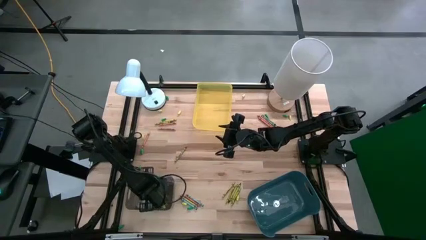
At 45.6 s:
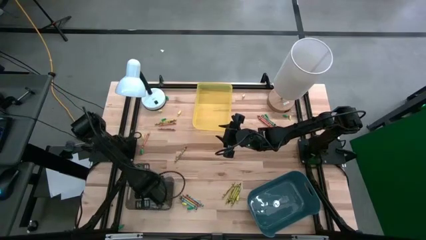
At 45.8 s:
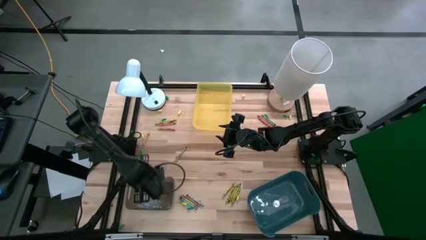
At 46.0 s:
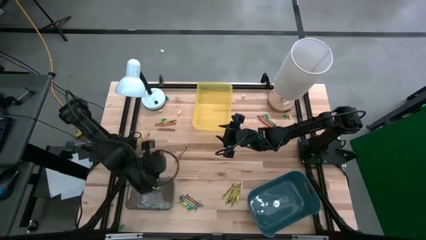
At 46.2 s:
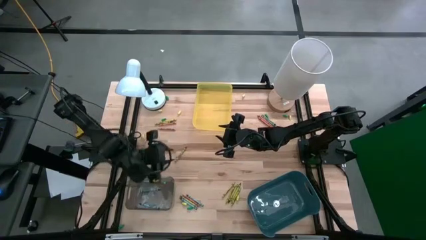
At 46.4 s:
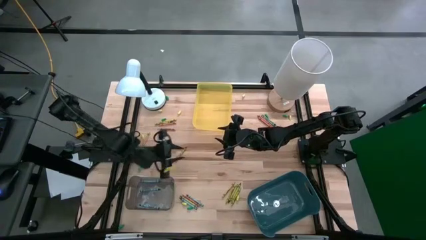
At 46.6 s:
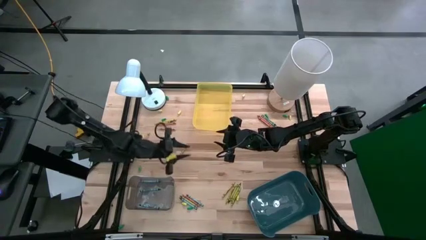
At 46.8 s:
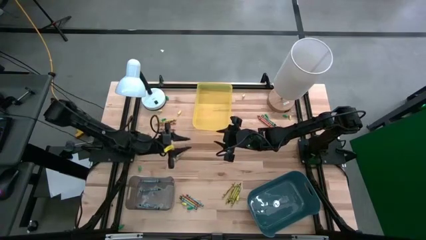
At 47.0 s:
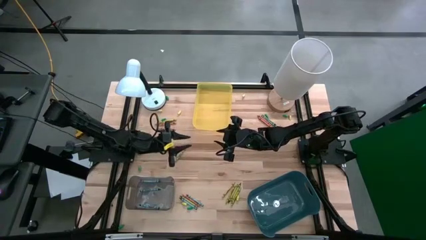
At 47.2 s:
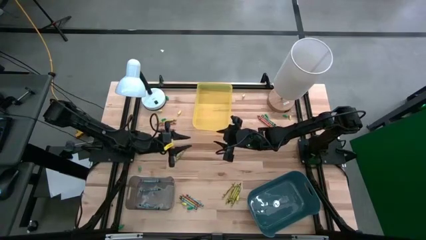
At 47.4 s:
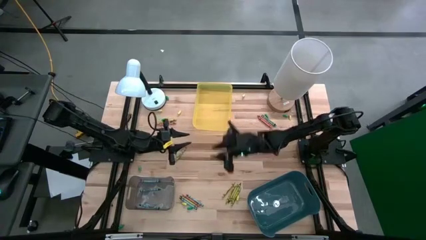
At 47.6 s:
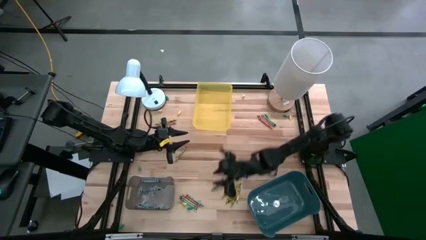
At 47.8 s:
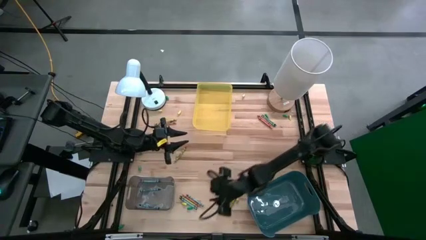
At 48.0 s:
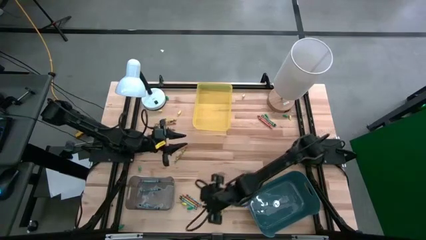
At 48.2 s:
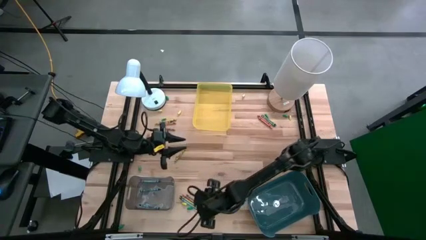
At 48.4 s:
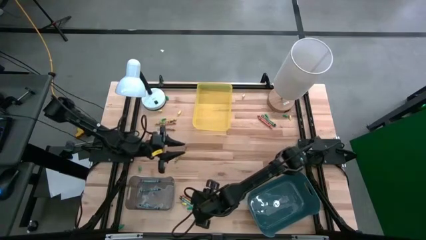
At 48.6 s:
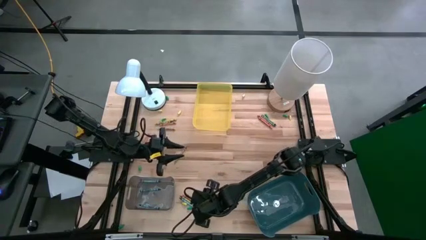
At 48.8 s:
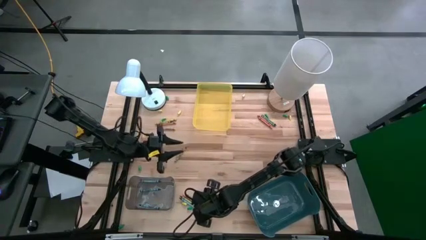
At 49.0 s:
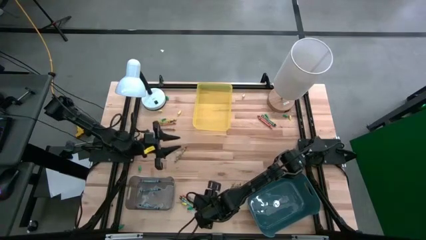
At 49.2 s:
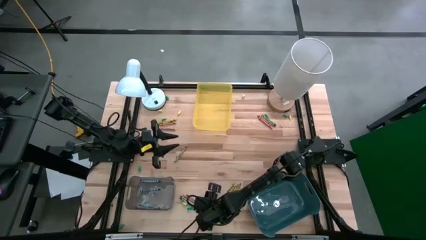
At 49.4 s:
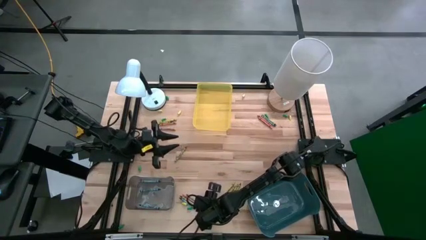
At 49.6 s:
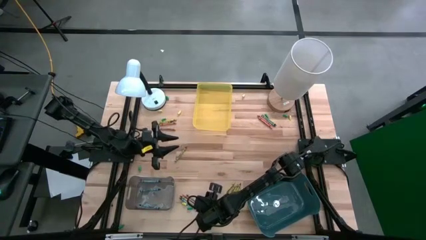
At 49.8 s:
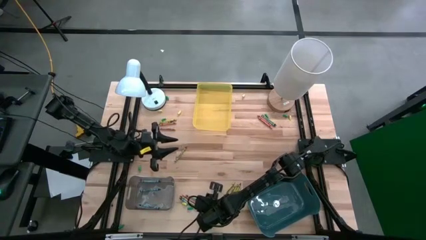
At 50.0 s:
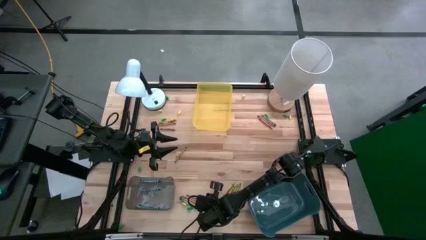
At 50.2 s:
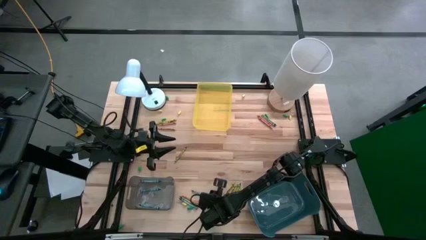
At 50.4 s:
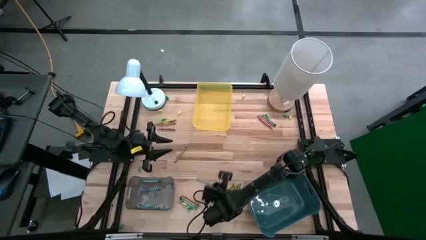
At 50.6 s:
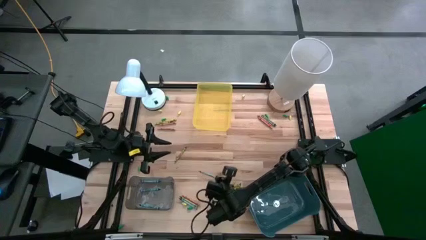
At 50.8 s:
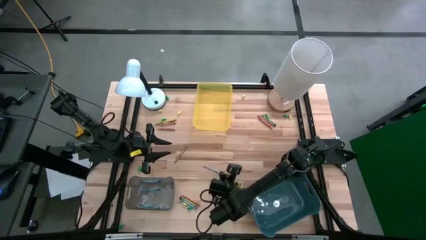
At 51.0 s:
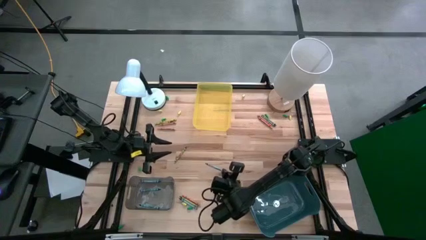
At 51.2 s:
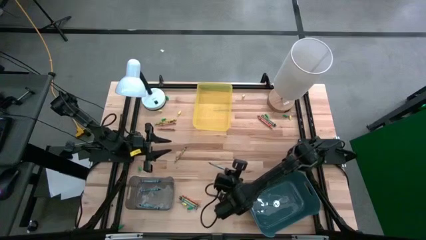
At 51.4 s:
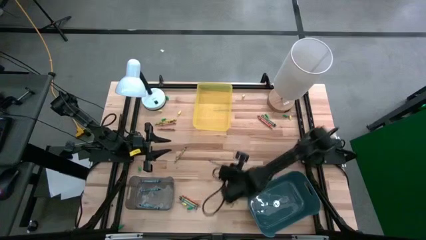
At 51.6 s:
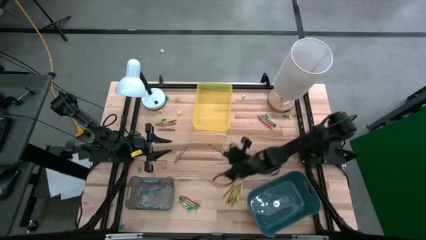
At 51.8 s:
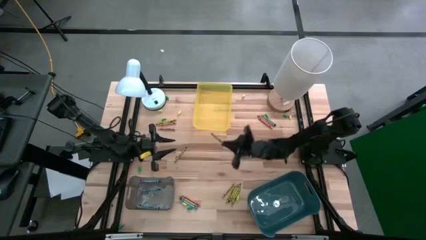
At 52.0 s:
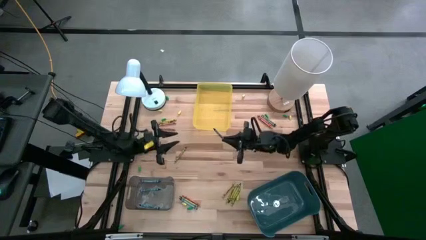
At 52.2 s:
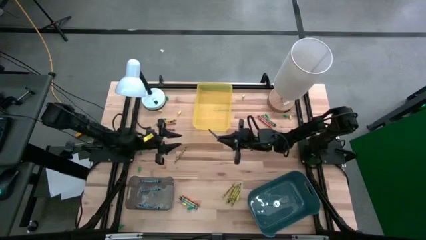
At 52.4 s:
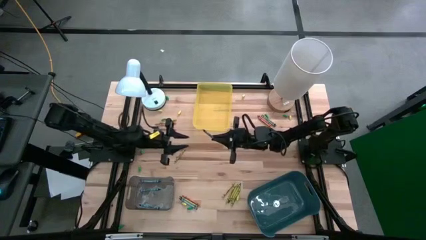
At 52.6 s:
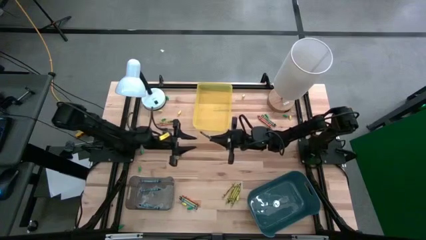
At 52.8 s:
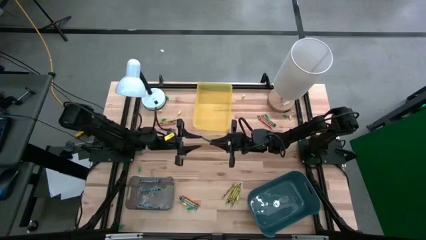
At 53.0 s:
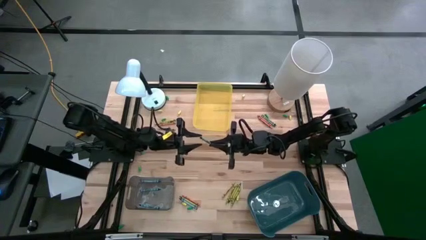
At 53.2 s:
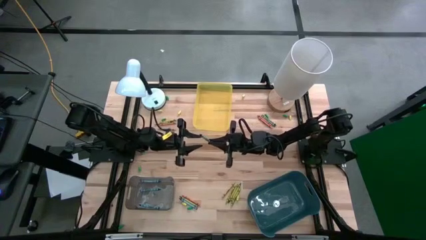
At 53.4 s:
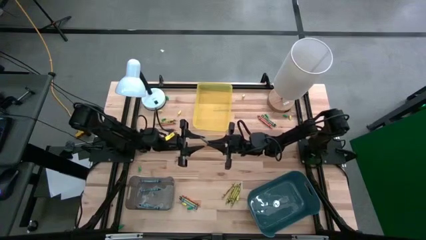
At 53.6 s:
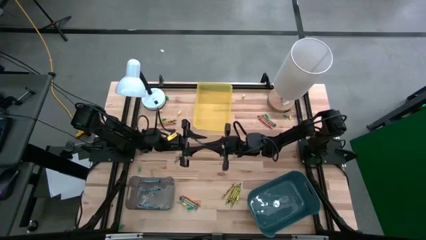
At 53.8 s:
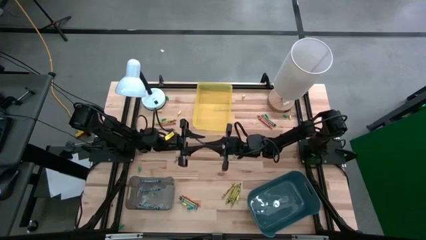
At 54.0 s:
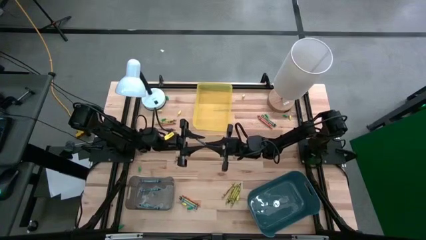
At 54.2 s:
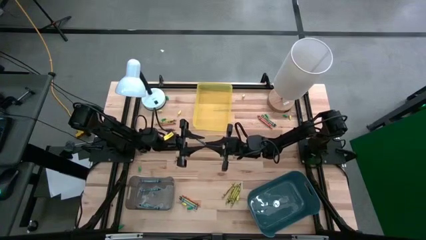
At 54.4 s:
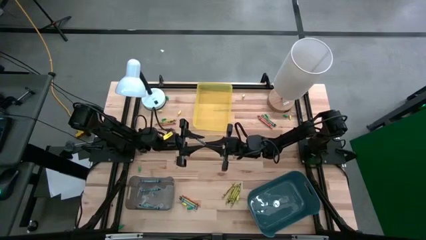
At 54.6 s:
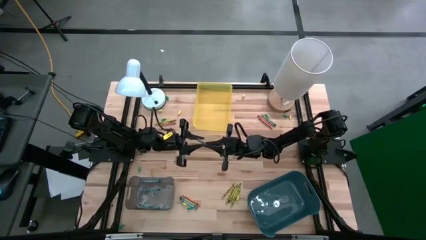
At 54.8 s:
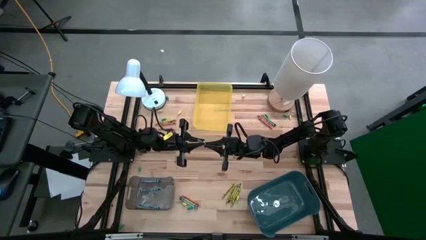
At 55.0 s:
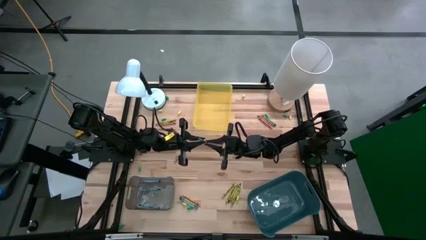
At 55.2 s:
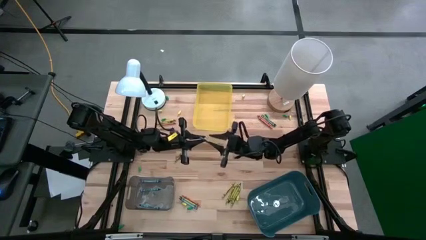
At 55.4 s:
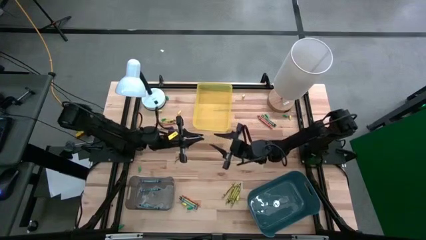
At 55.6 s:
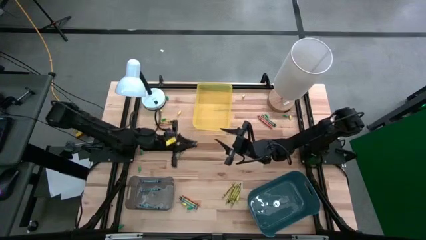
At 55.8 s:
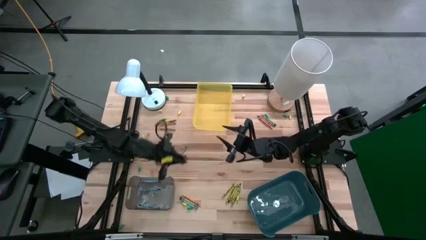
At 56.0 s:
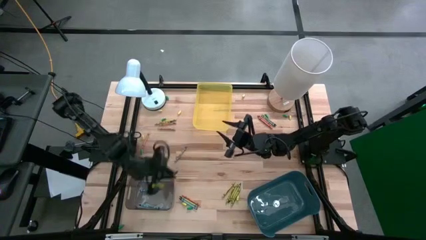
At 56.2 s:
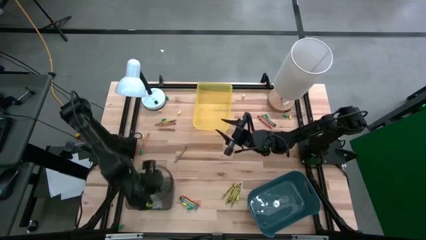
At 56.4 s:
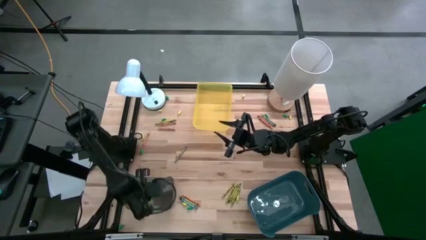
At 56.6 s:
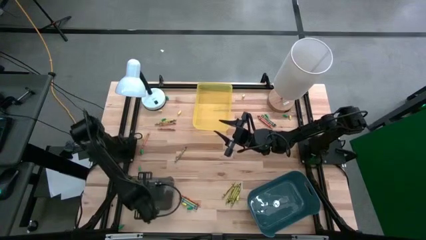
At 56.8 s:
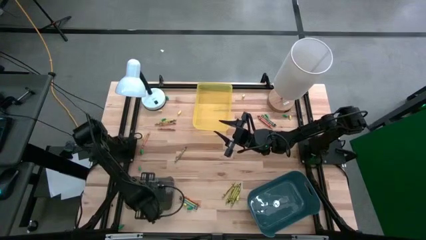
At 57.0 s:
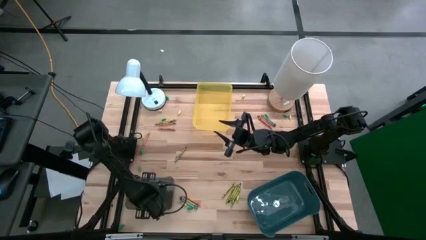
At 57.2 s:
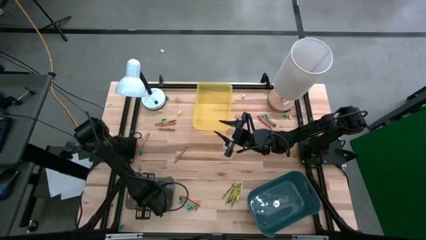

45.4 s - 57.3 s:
Task: Sort crayons
Put the blue crayon into the black bin
